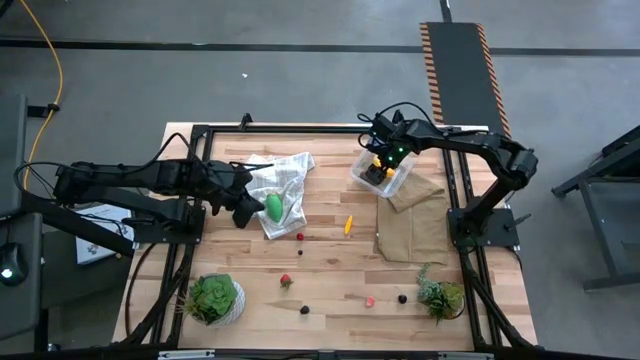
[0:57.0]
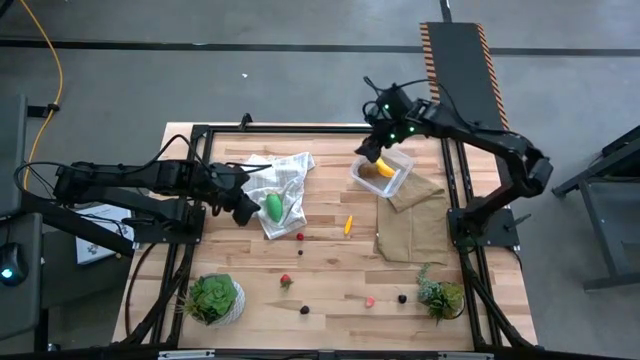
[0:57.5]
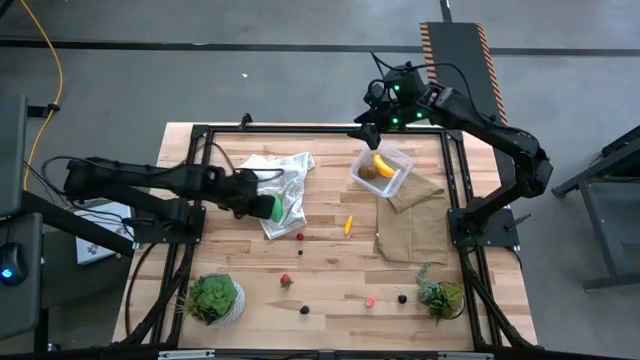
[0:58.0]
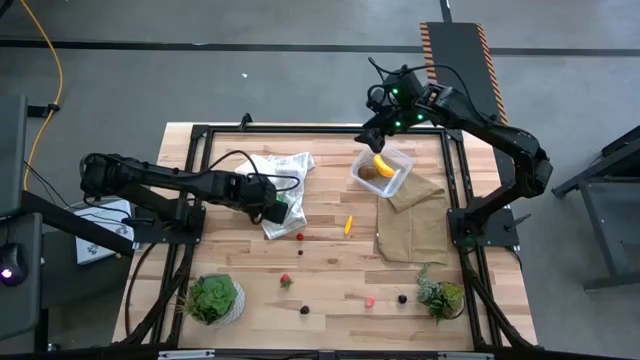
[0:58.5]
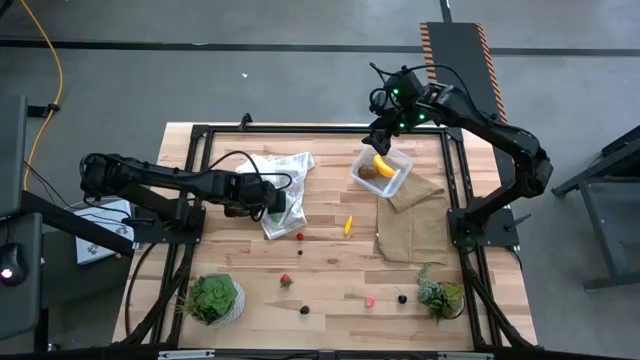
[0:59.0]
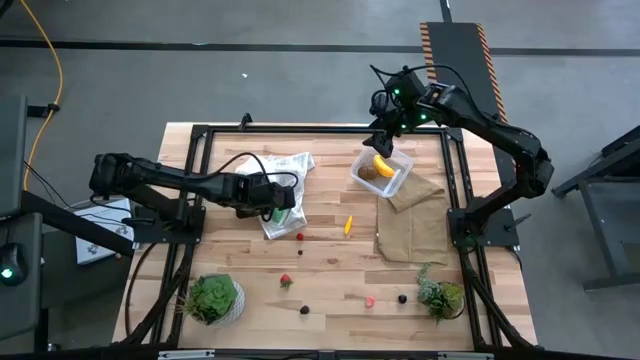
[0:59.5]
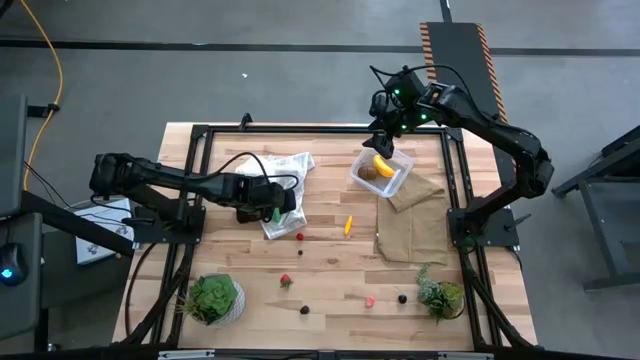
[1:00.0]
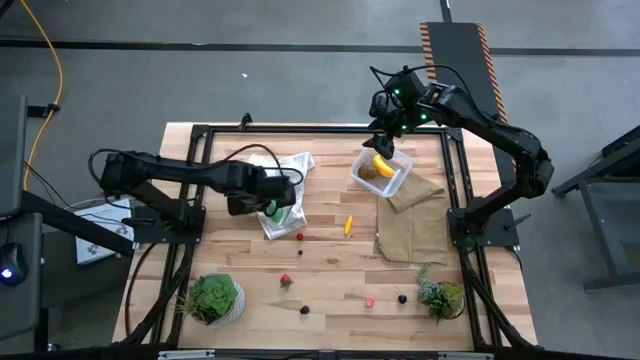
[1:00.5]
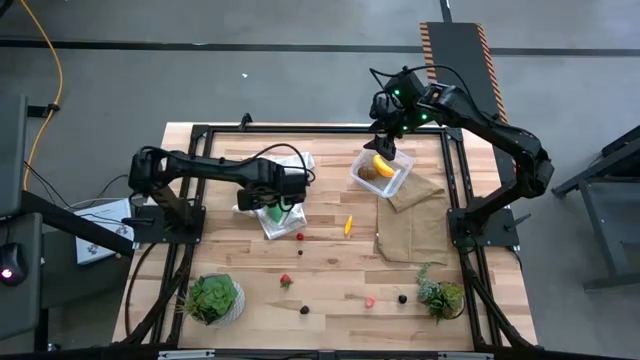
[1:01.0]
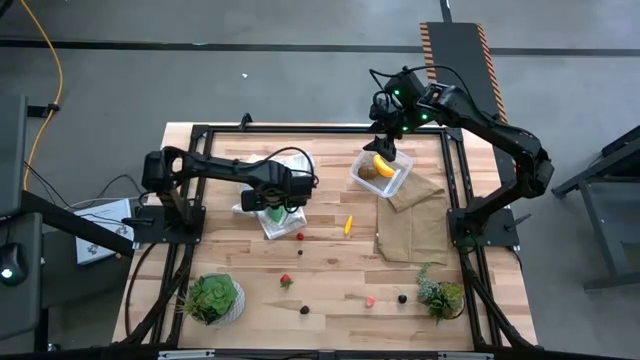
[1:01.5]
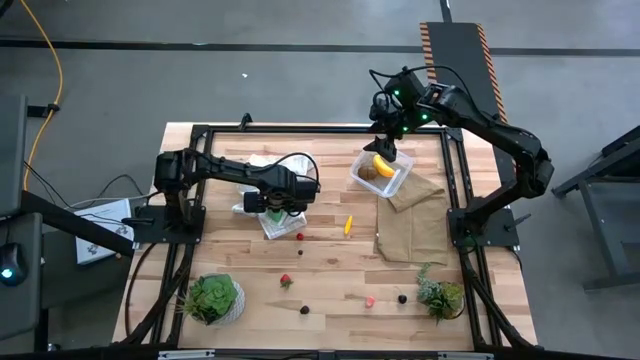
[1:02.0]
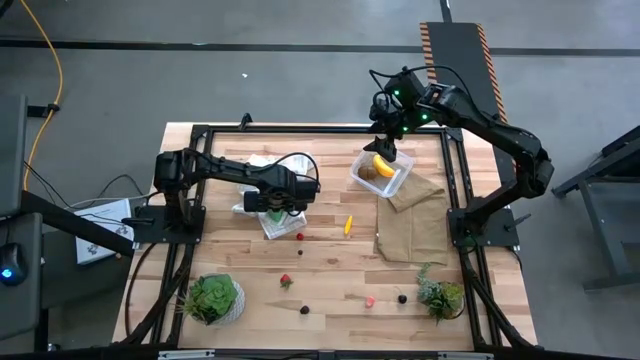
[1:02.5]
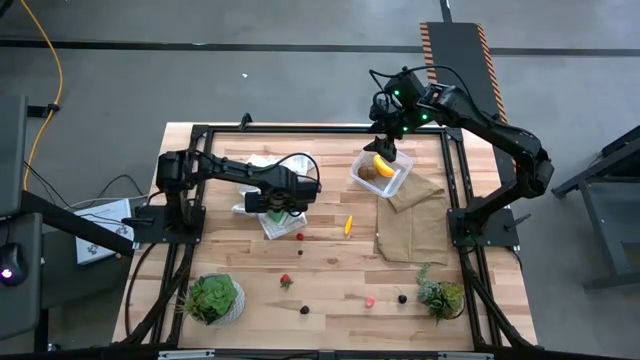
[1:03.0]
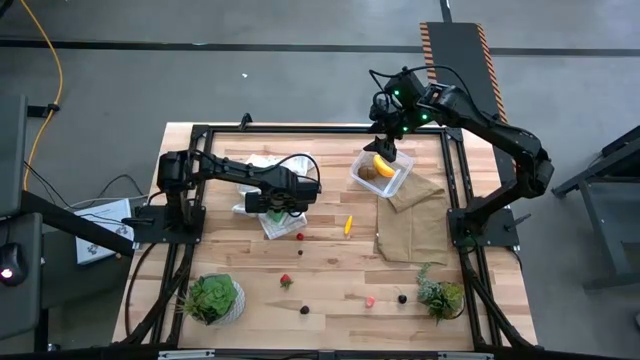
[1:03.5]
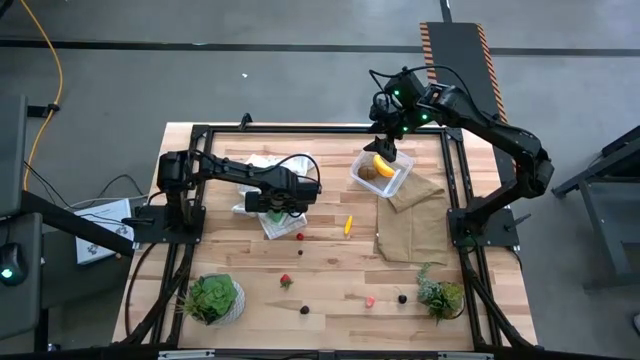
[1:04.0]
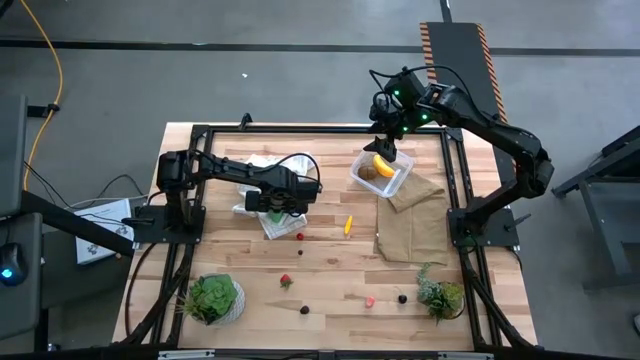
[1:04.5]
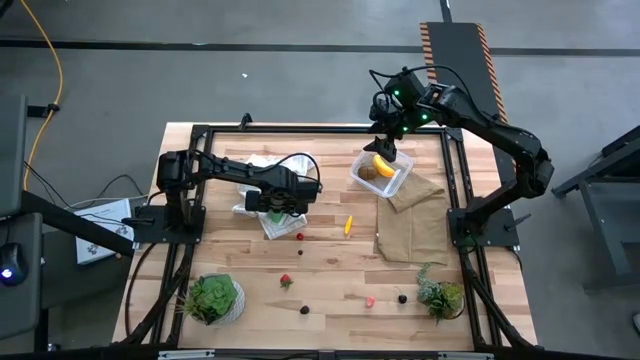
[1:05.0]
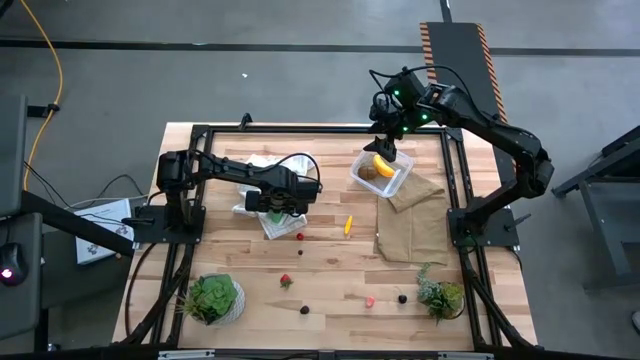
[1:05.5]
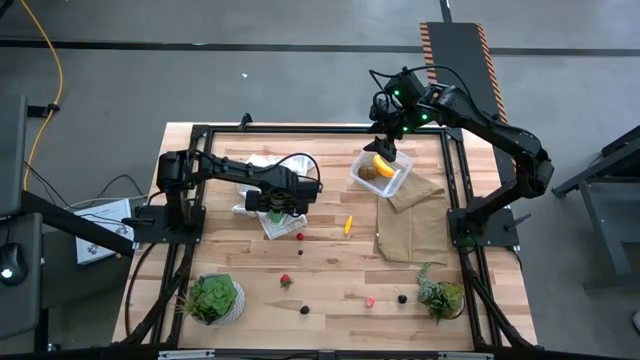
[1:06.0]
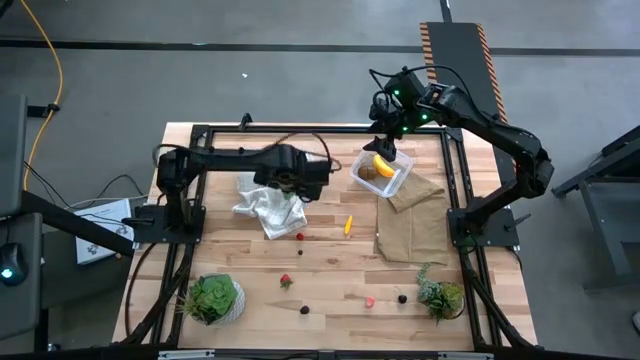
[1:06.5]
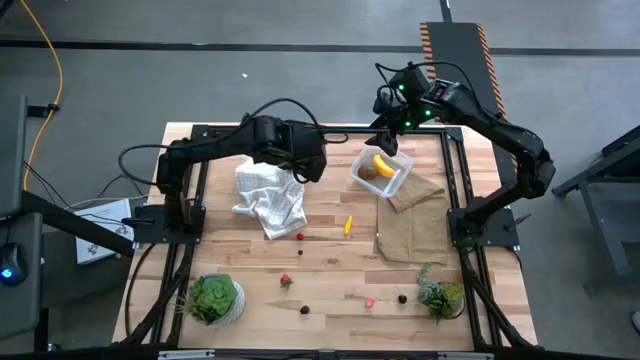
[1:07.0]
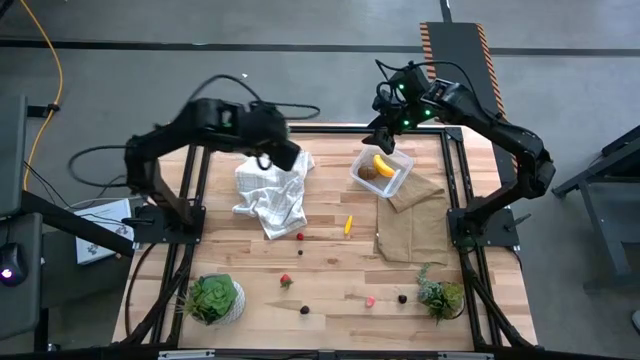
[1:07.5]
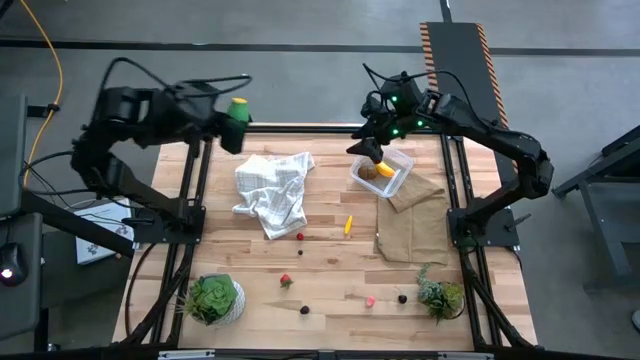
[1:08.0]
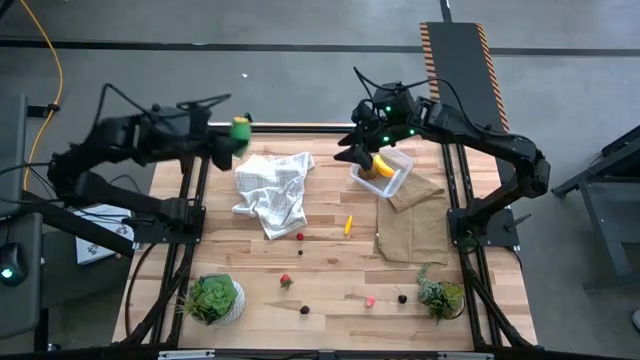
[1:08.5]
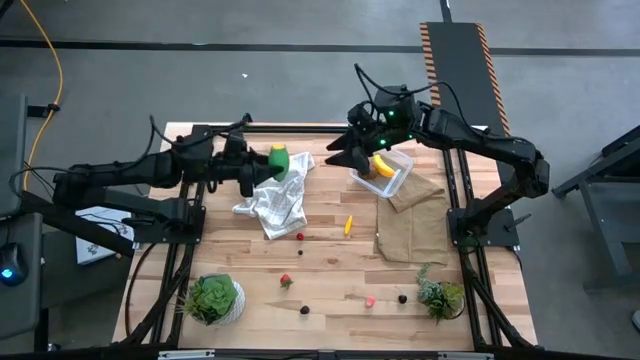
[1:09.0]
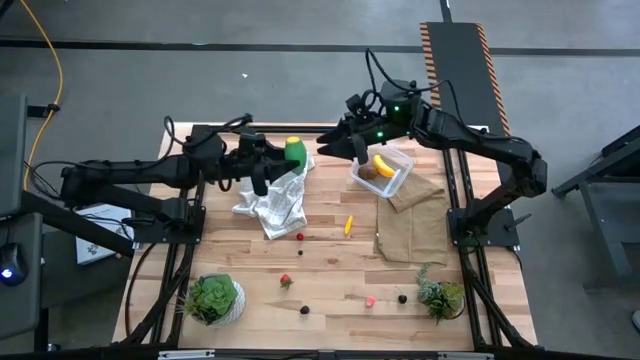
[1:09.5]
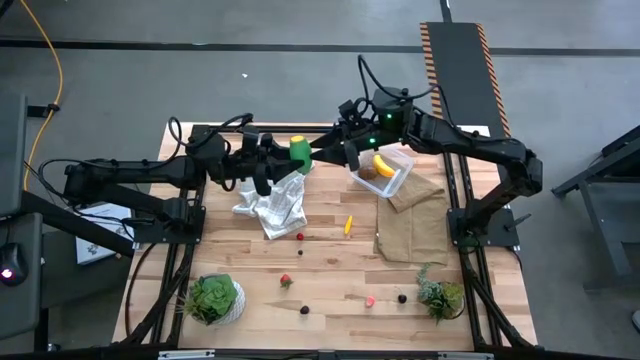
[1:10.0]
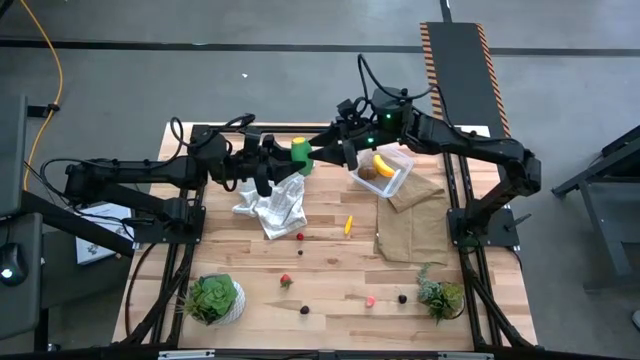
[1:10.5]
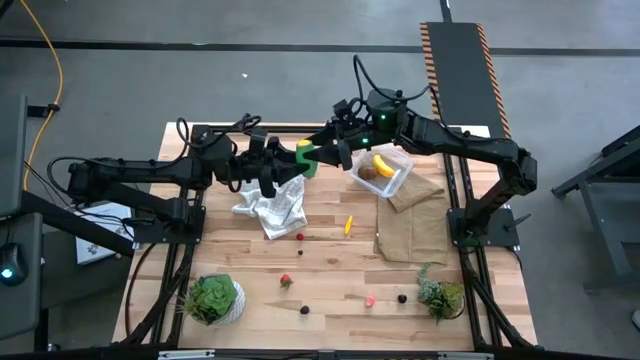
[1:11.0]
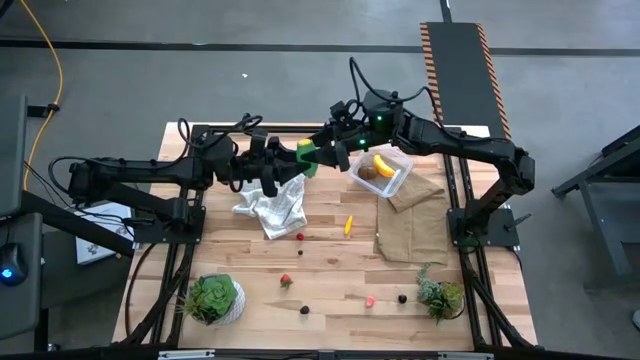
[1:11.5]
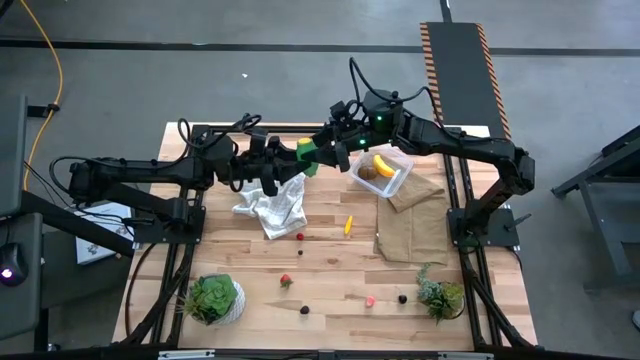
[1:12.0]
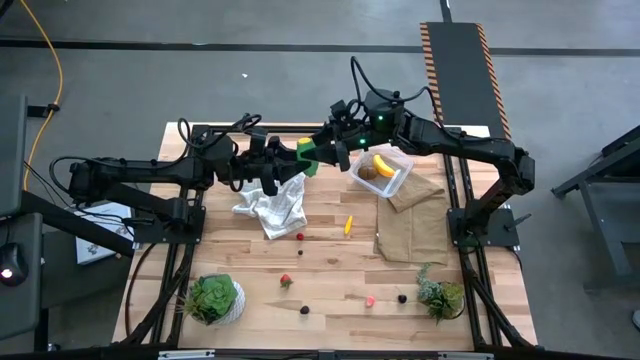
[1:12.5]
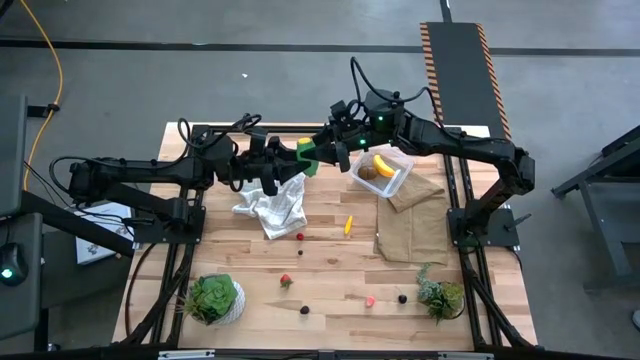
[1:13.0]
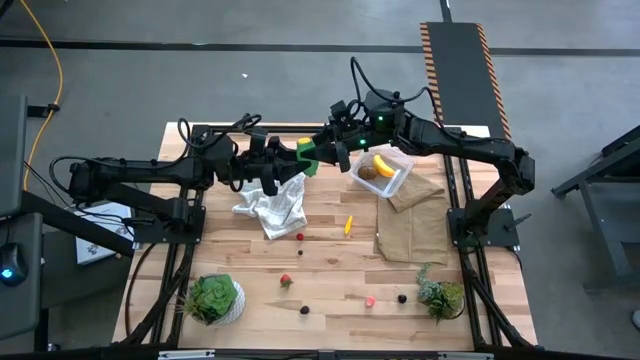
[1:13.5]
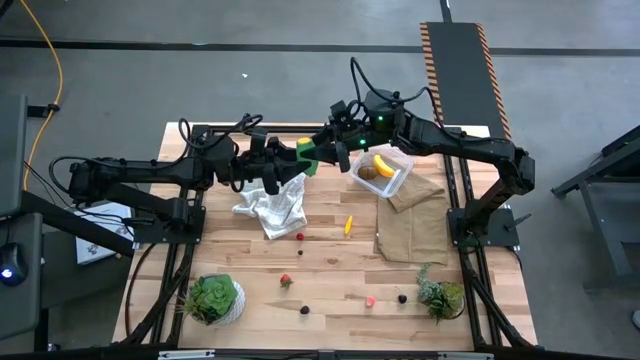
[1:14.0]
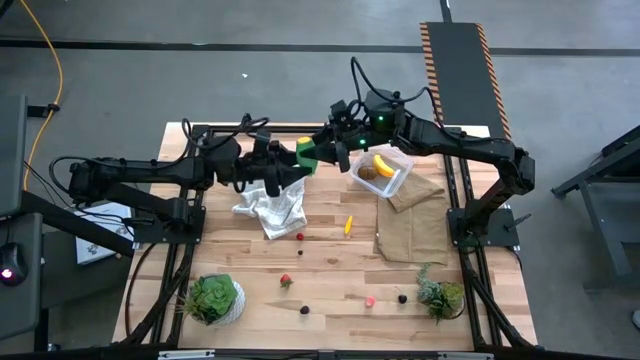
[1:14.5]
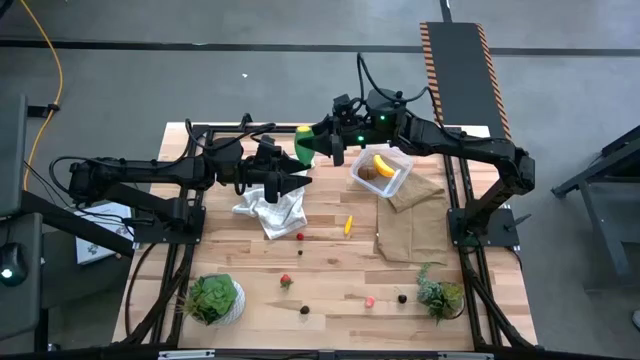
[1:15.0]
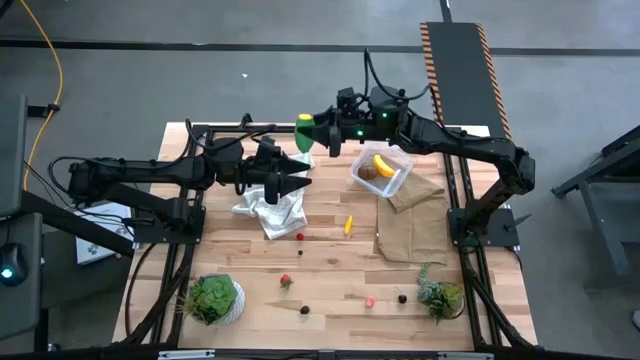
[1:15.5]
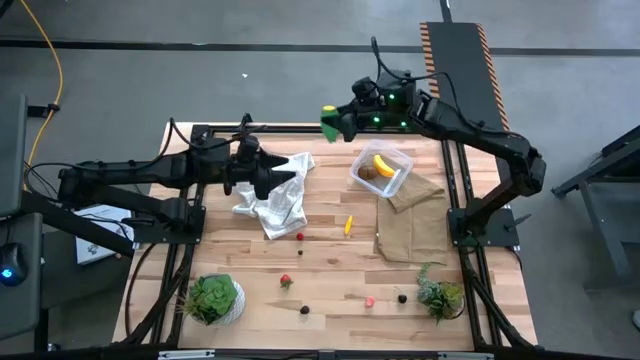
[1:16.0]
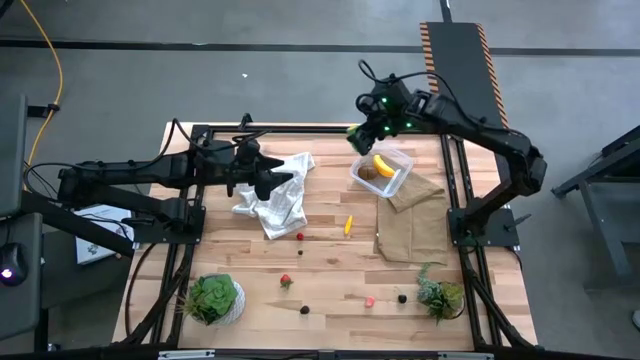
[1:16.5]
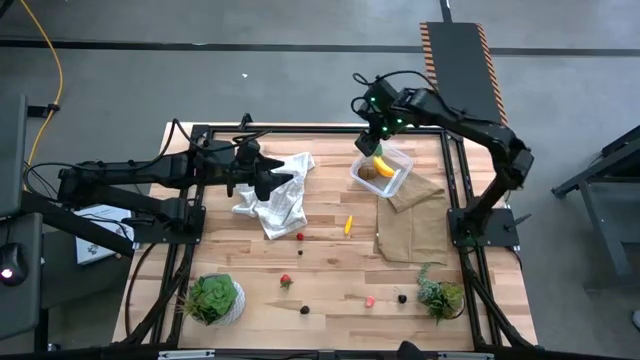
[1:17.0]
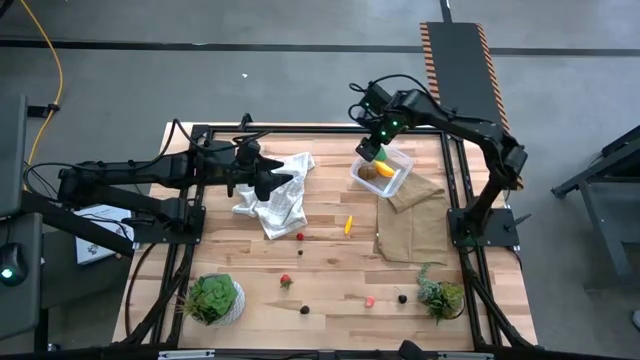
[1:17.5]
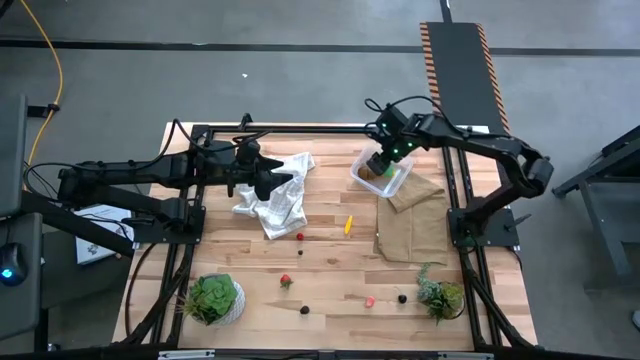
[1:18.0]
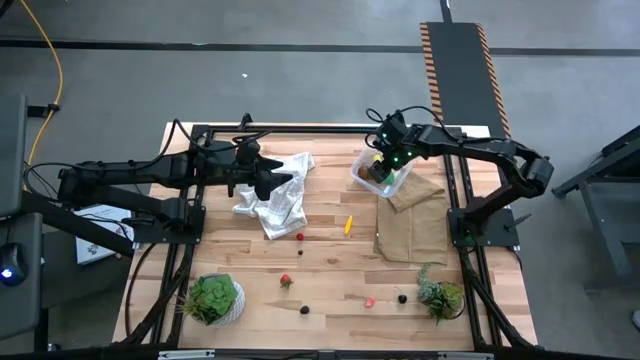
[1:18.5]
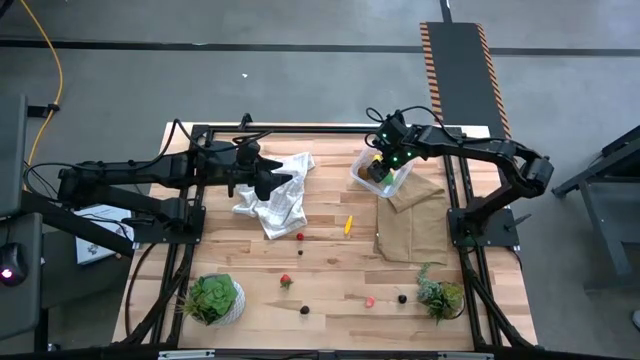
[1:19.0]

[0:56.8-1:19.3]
Task: Pick and placing Produce into tupperware
Put the green corn into the transparent bin
